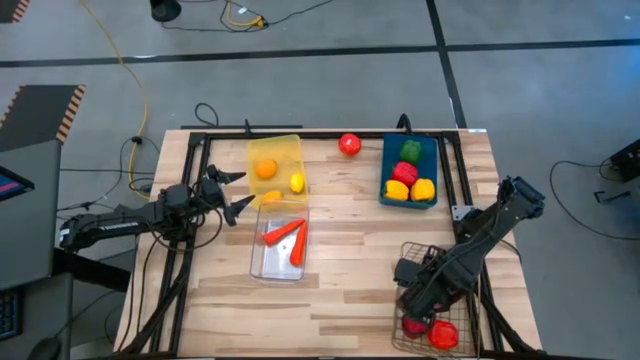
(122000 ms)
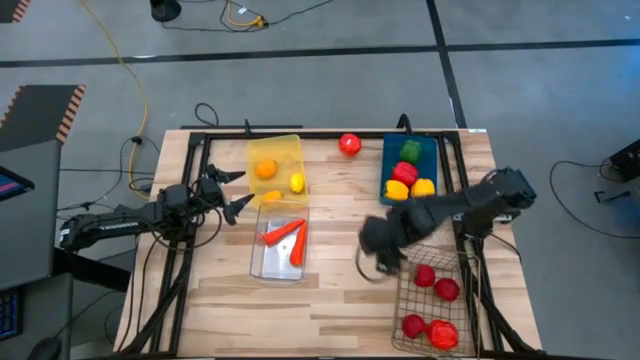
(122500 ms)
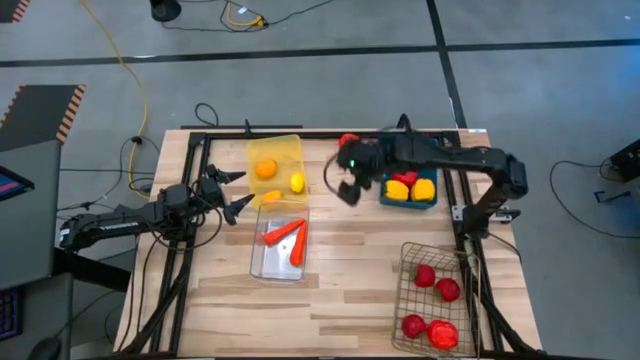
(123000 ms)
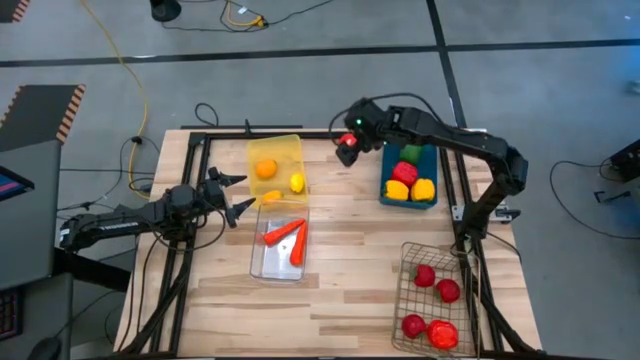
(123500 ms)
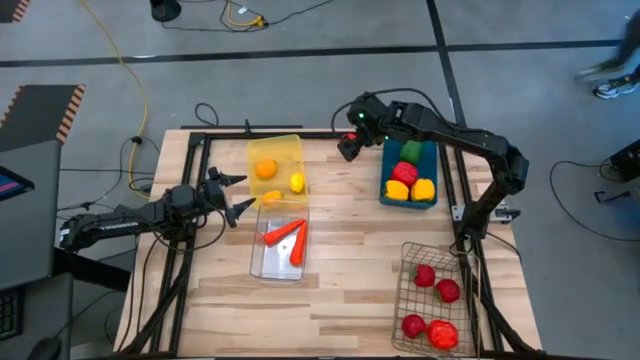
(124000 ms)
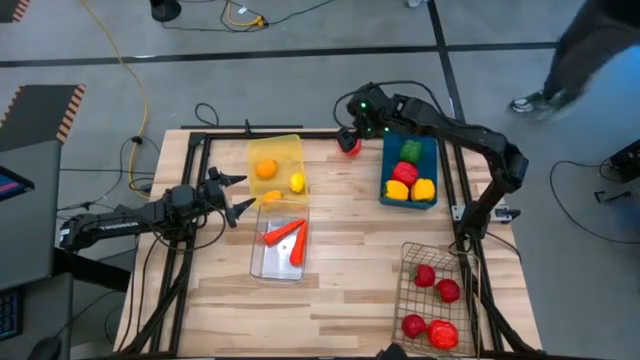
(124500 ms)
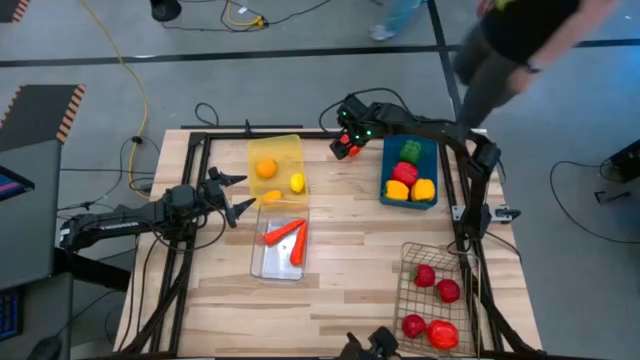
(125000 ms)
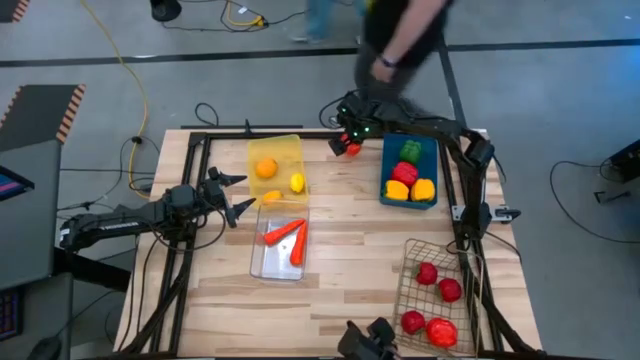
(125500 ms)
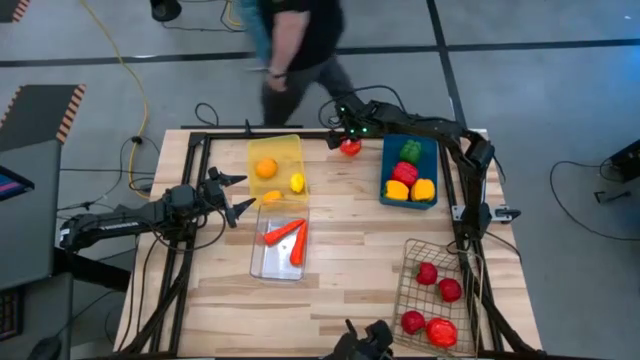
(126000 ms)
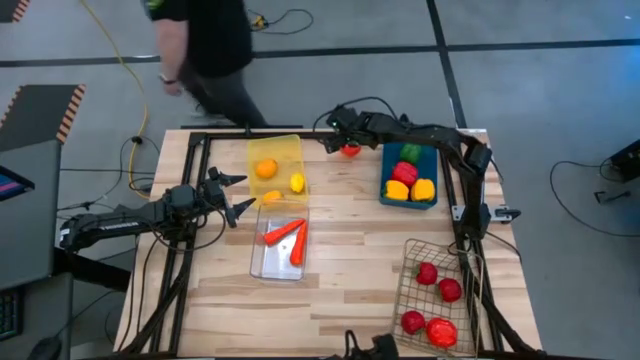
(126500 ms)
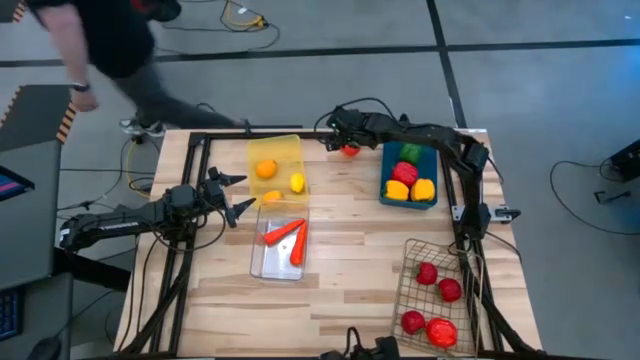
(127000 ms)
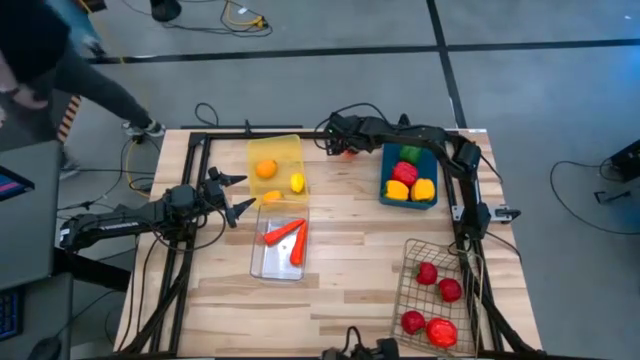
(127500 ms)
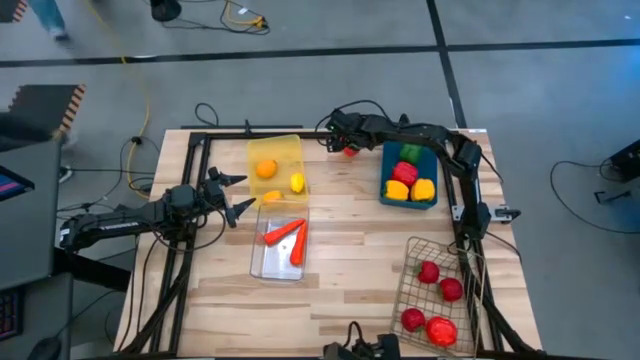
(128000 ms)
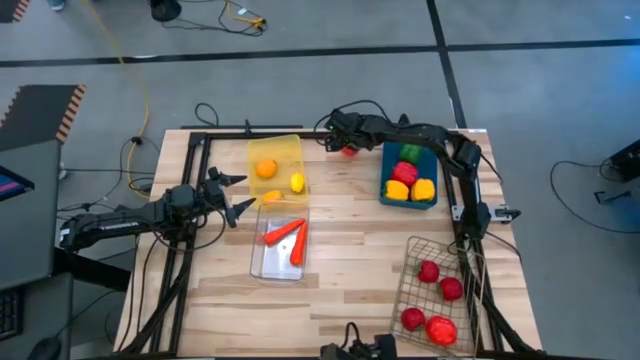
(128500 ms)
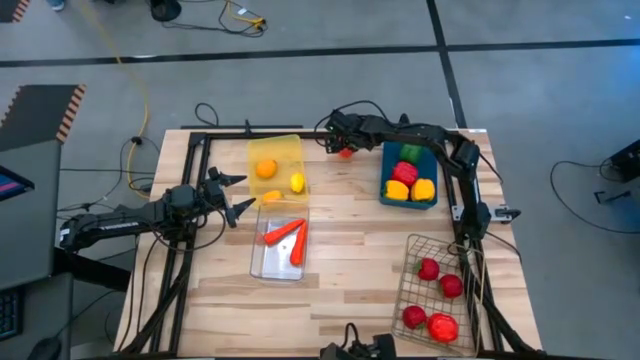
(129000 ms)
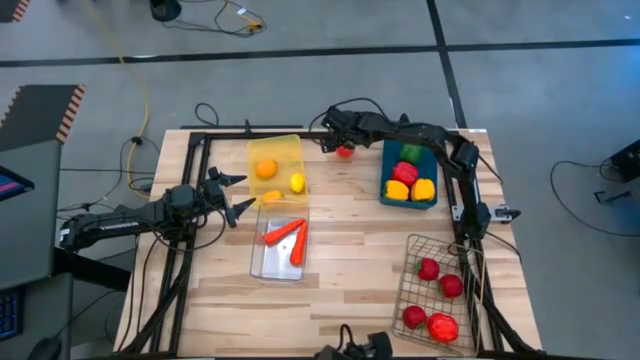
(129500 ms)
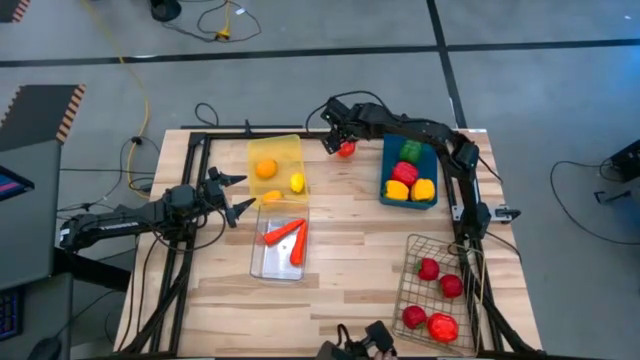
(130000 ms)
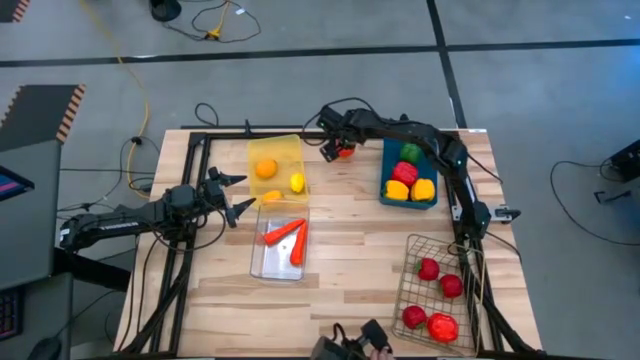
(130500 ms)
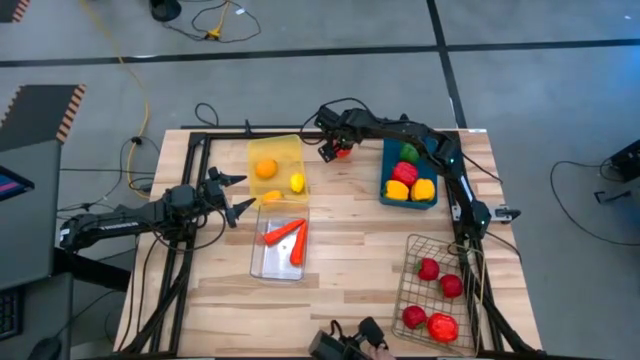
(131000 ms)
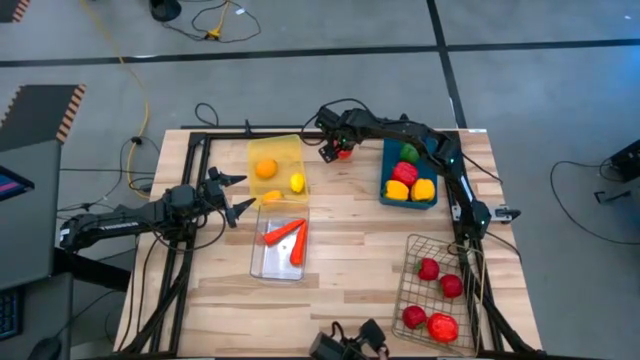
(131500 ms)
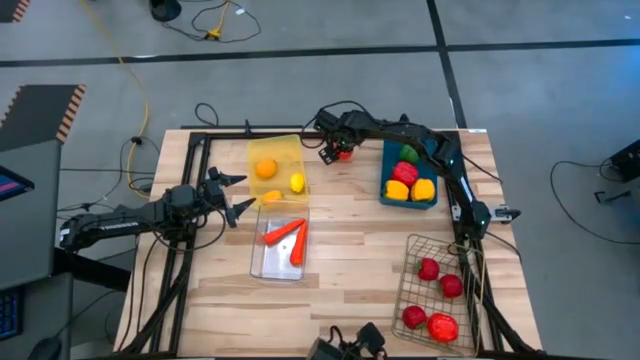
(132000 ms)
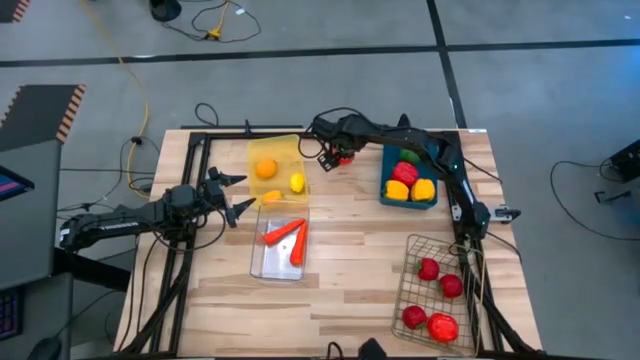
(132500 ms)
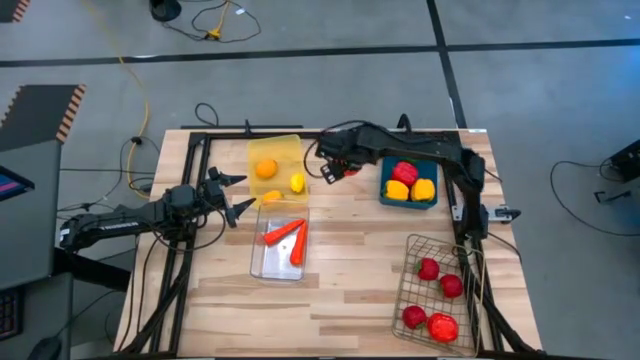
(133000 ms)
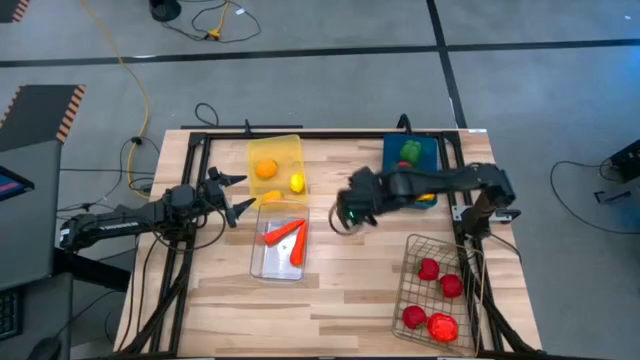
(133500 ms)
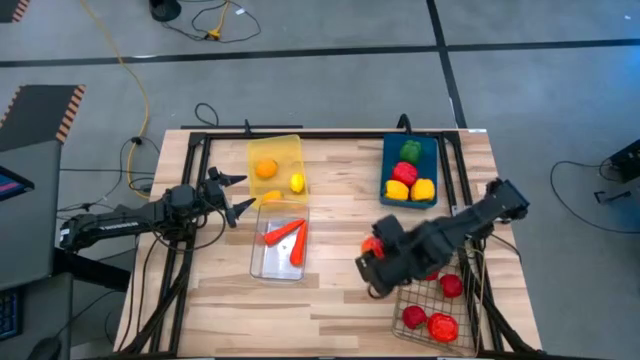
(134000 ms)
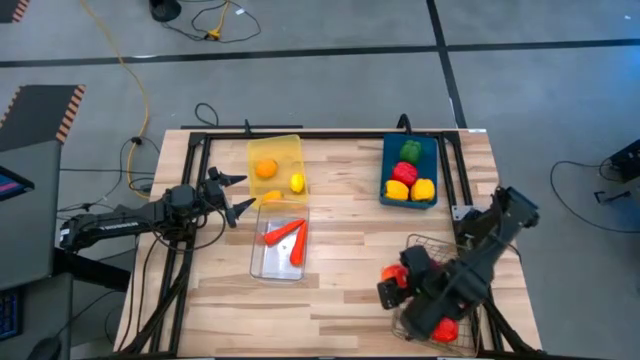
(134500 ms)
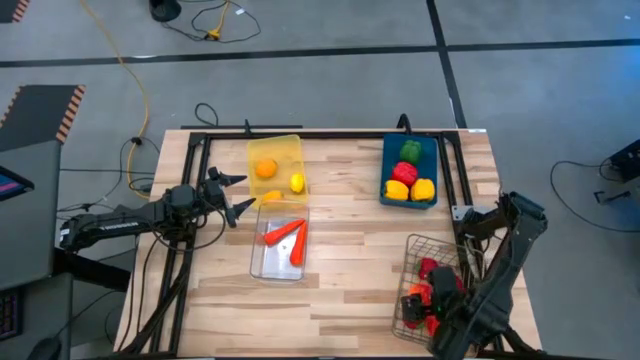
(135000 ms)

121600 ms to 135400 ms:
Task: Sort produce into baskets
Put the orange tomato into the wire basket

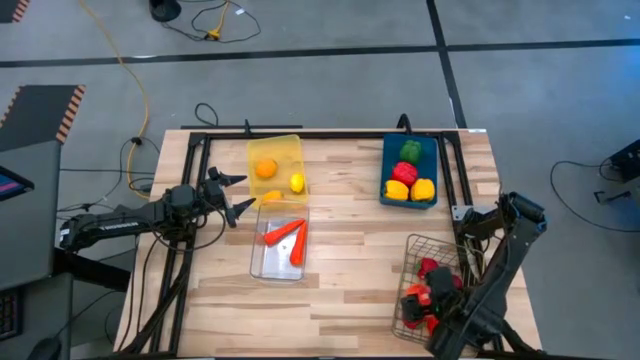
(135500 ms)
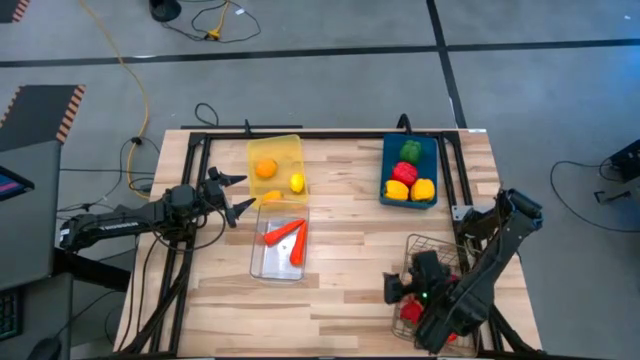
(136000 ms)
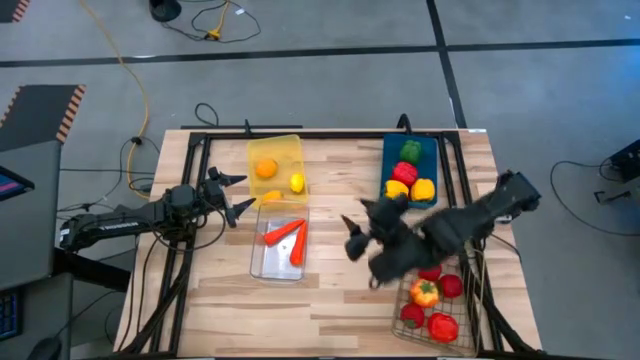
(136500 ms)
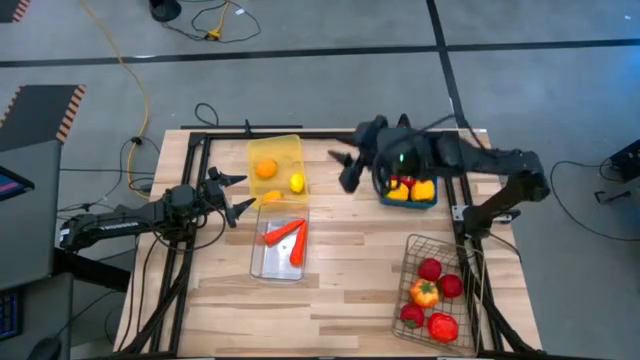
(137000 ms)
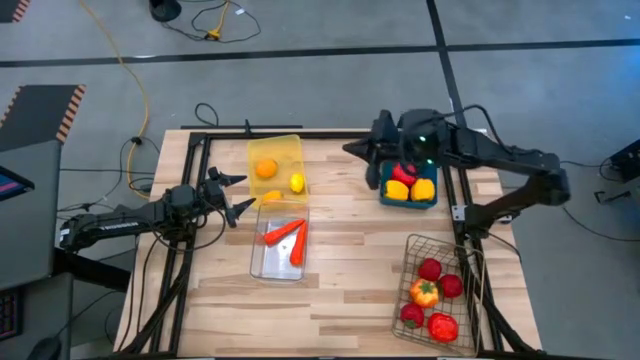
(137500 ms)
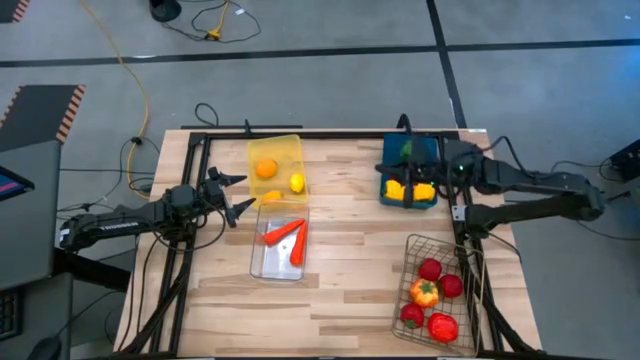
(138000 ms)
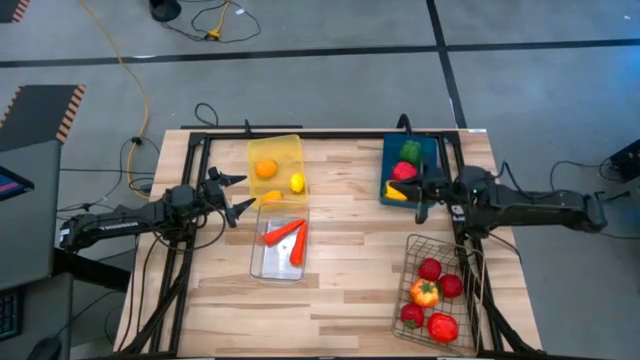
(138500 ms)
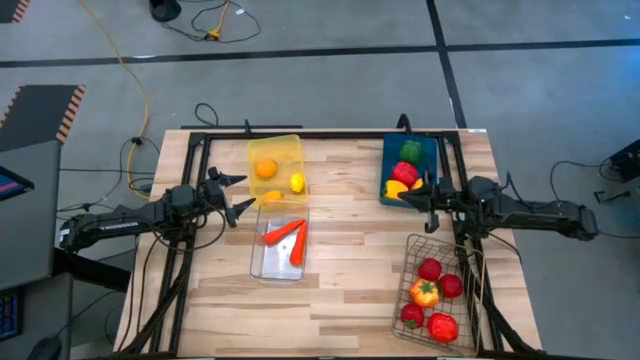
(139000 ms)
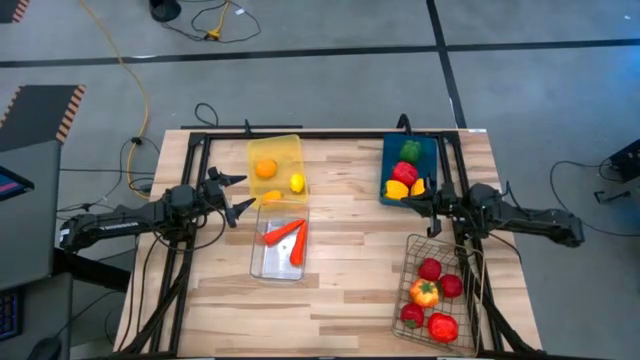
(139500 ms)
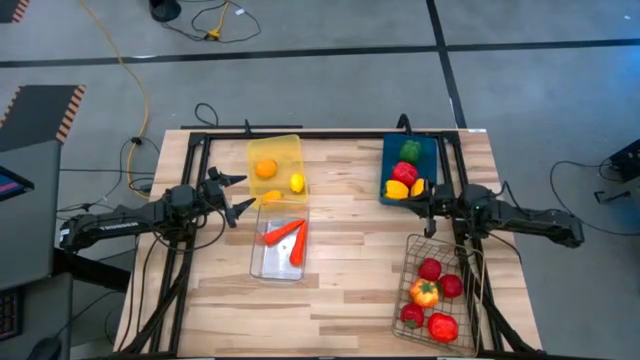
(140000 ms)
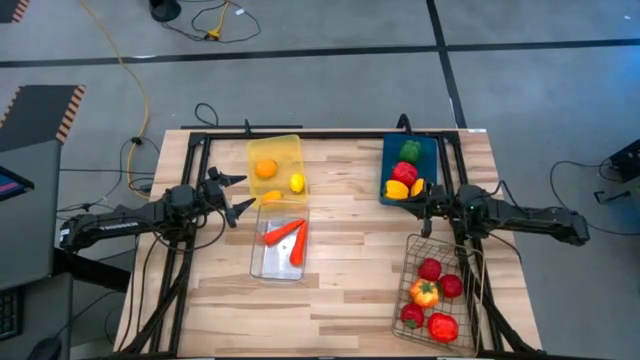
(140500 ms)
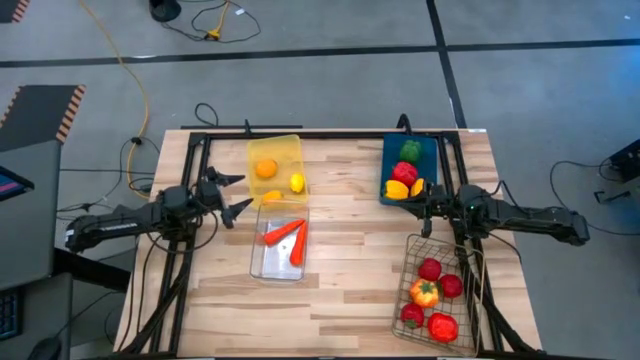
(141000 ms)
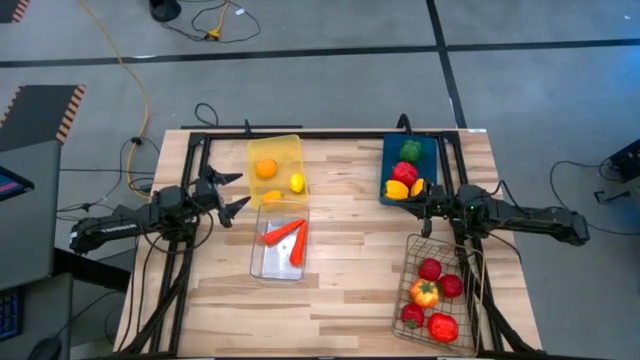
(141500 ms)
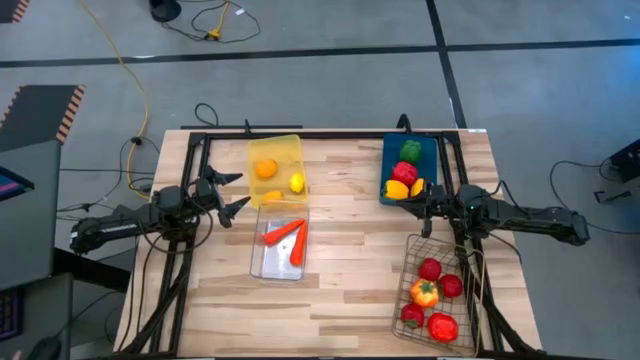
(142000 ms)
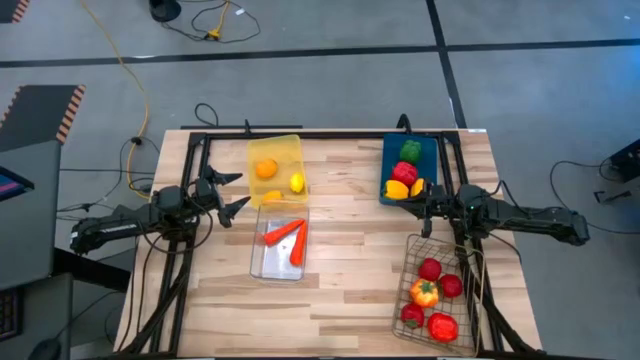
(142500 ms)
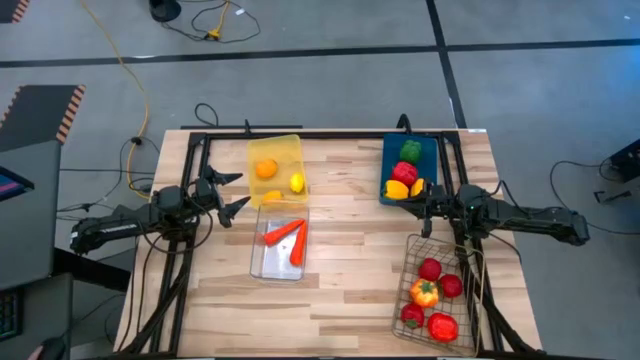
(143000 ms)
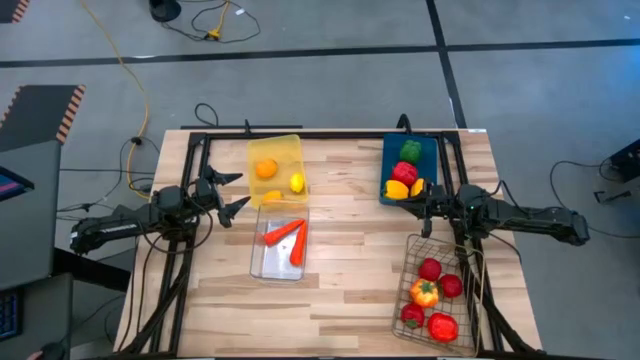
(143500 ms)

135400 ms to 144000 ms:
Return to Home Position
